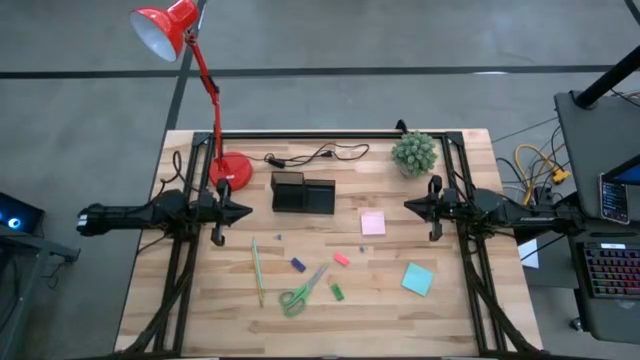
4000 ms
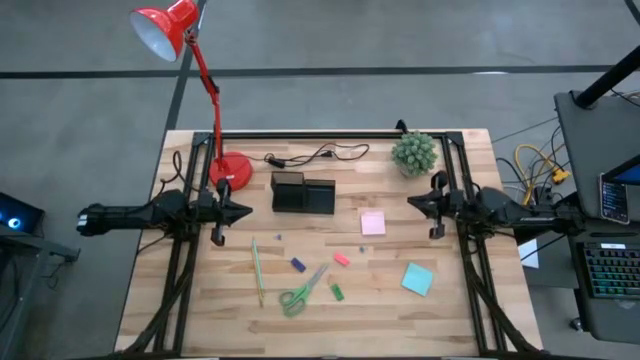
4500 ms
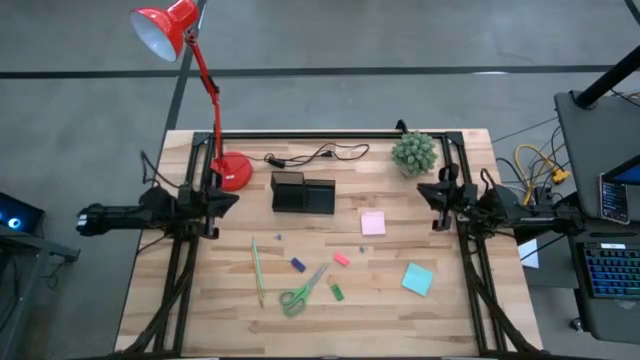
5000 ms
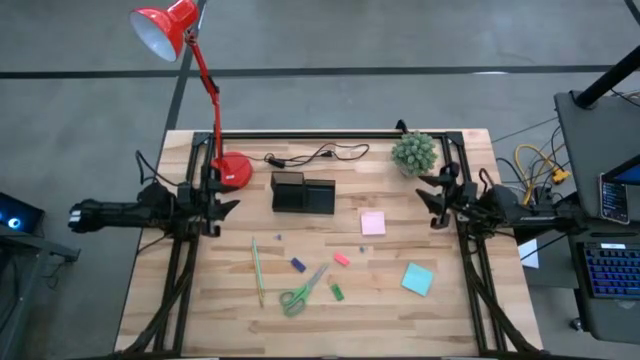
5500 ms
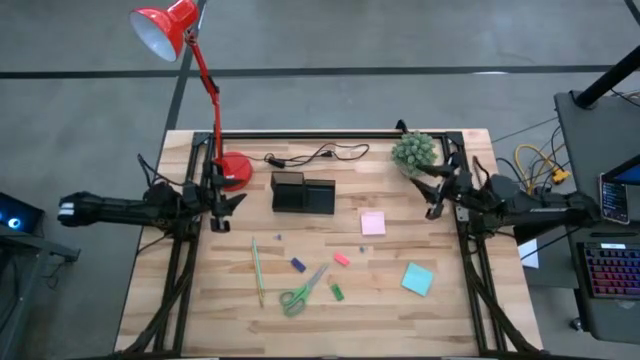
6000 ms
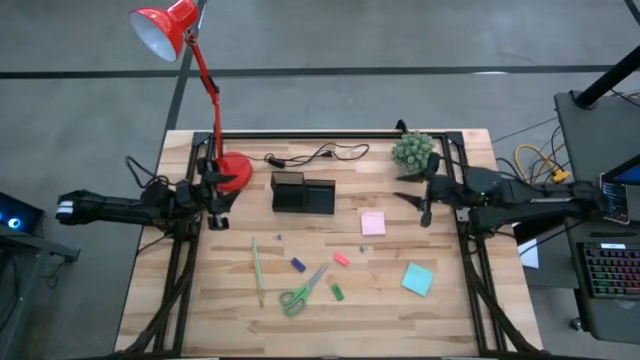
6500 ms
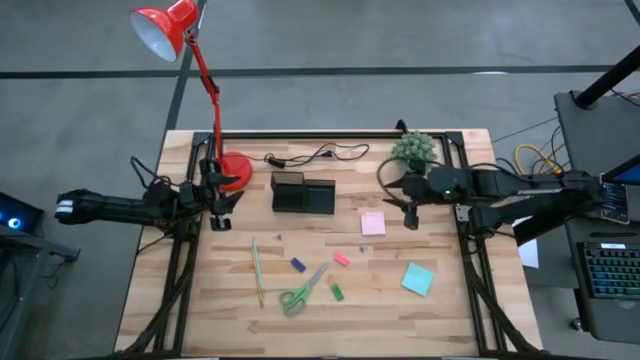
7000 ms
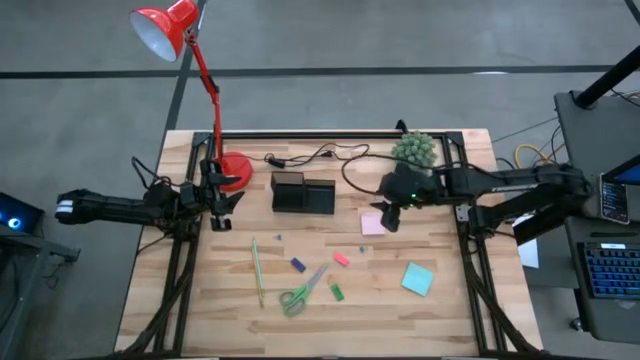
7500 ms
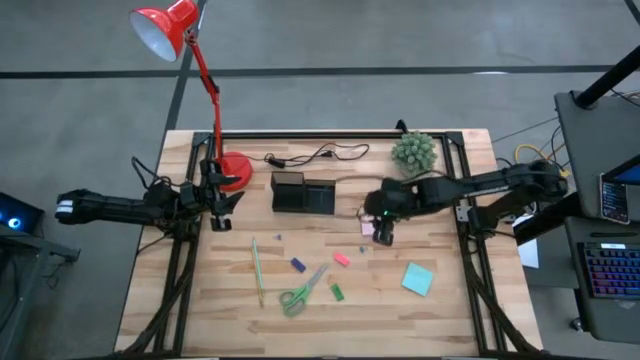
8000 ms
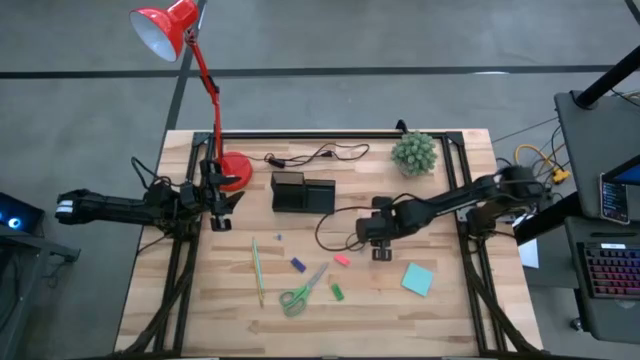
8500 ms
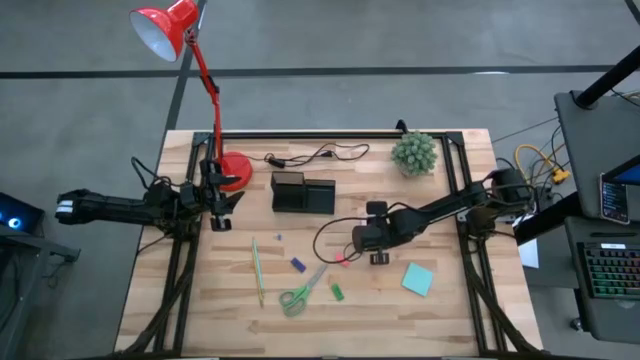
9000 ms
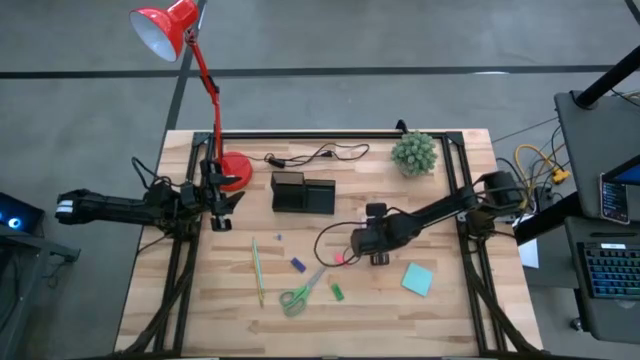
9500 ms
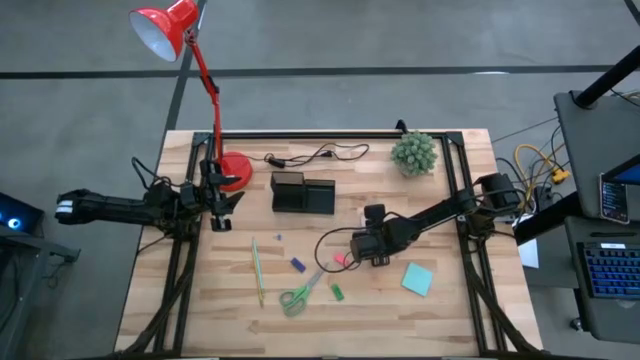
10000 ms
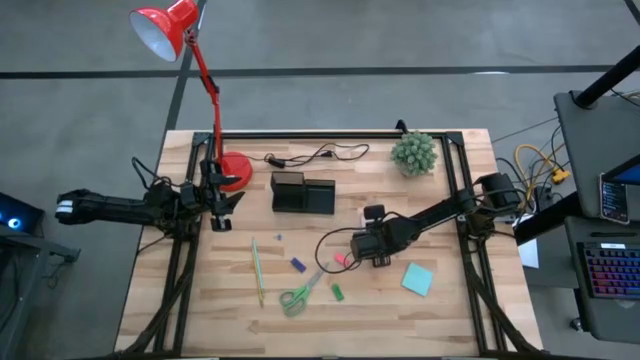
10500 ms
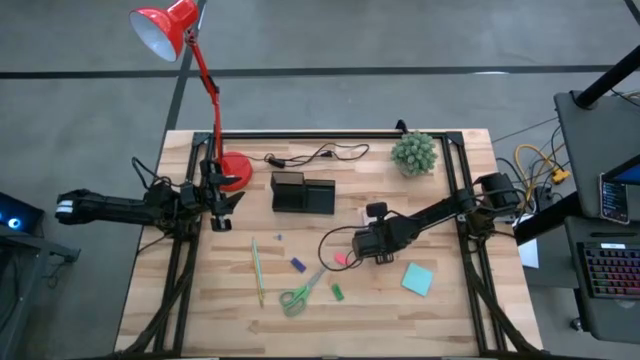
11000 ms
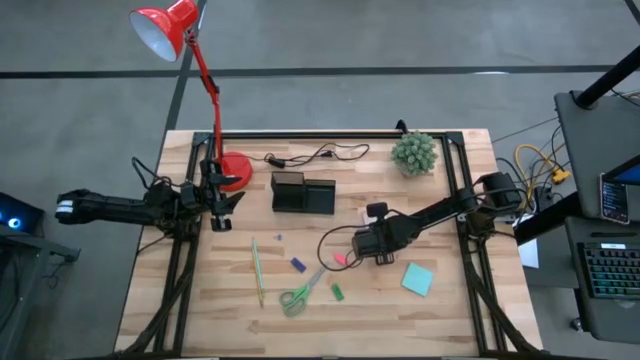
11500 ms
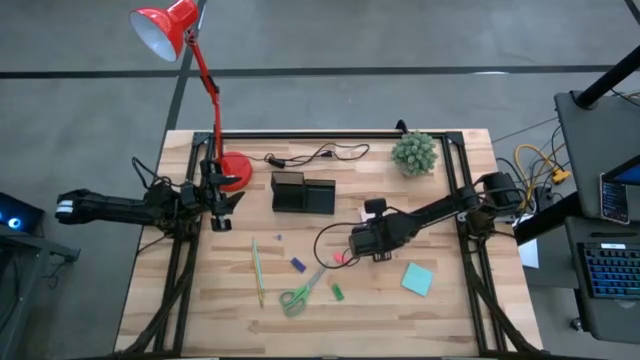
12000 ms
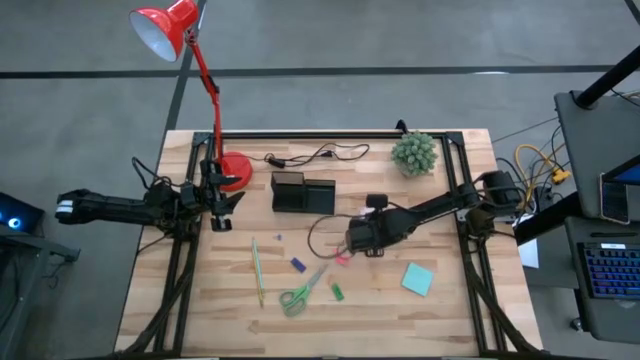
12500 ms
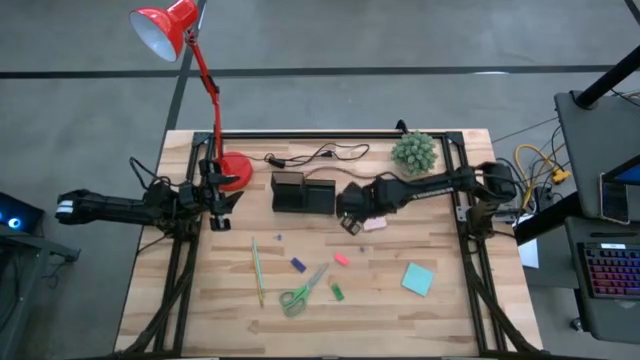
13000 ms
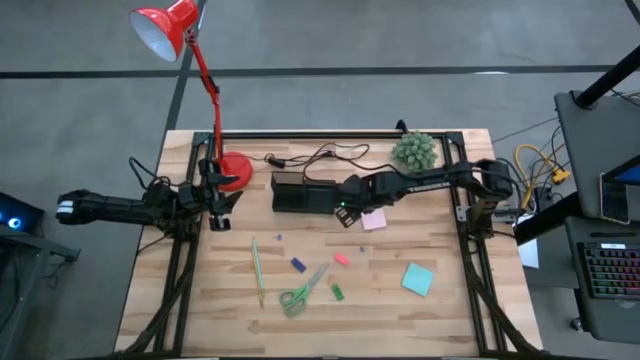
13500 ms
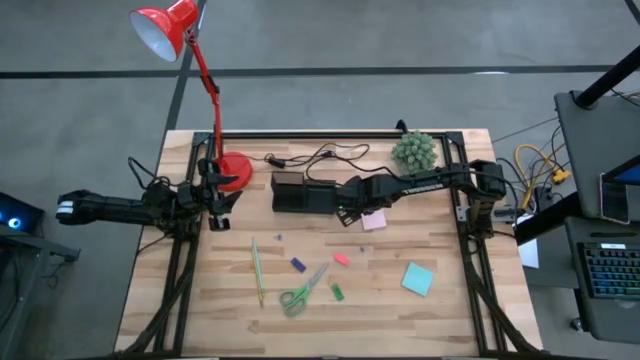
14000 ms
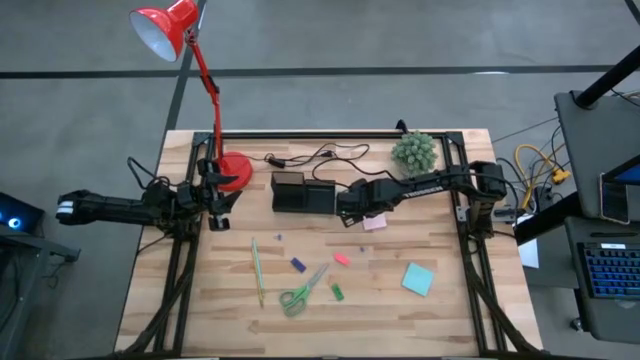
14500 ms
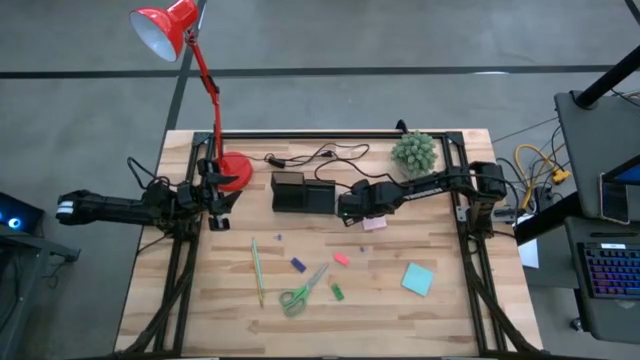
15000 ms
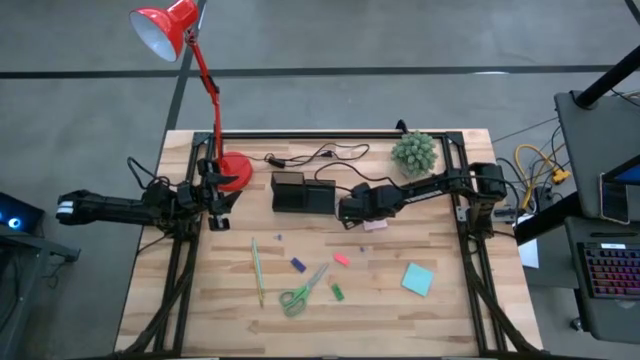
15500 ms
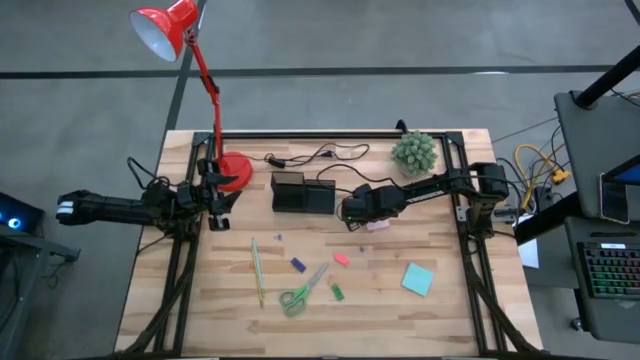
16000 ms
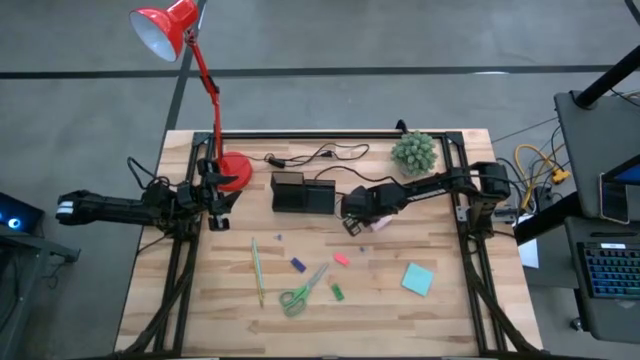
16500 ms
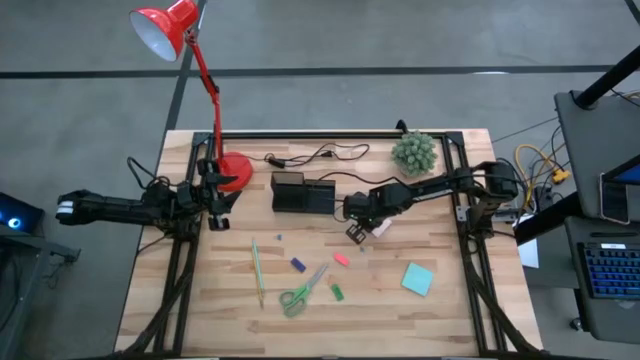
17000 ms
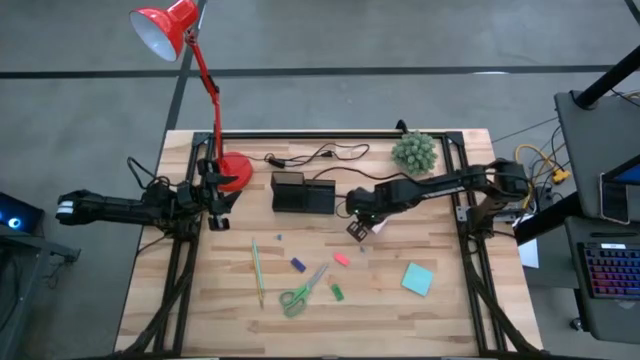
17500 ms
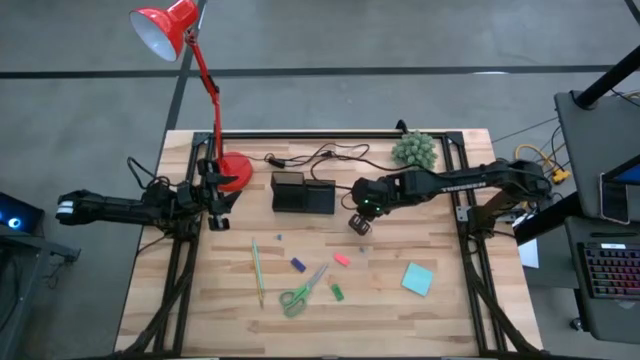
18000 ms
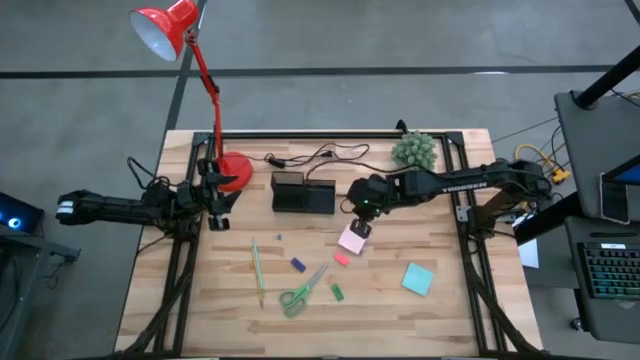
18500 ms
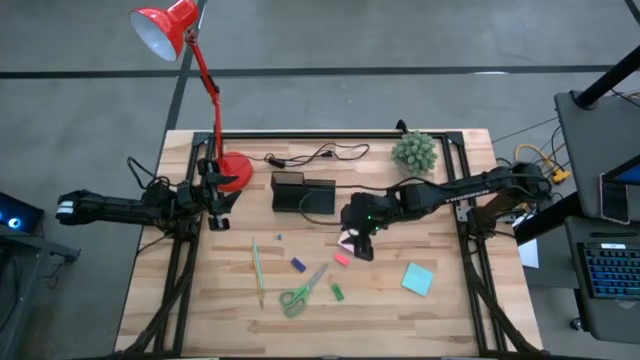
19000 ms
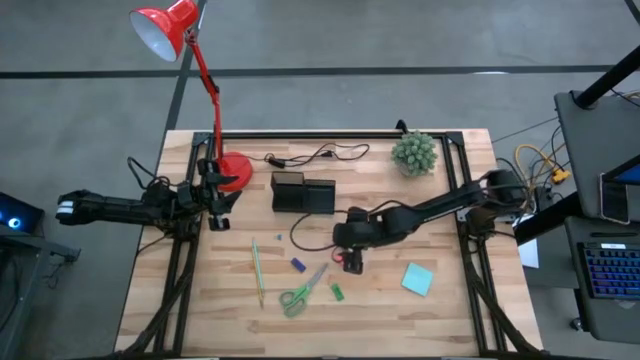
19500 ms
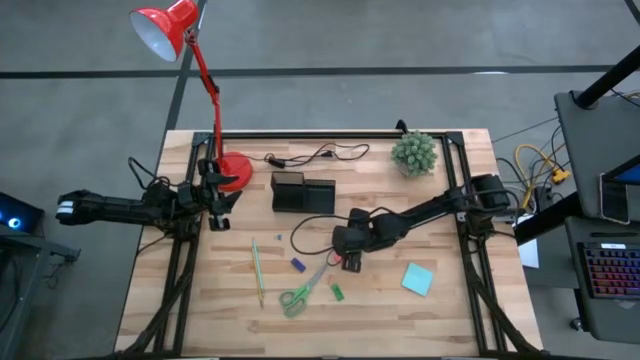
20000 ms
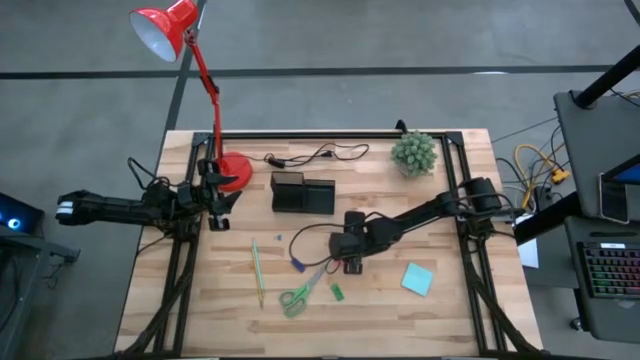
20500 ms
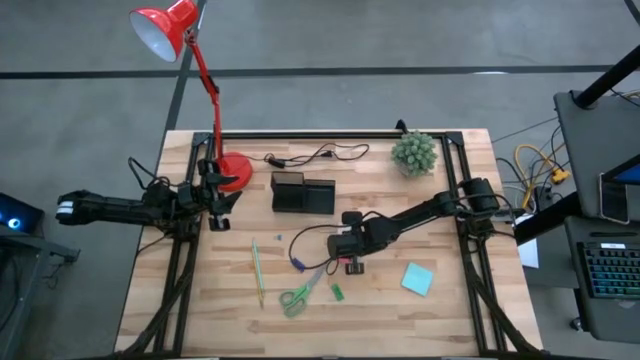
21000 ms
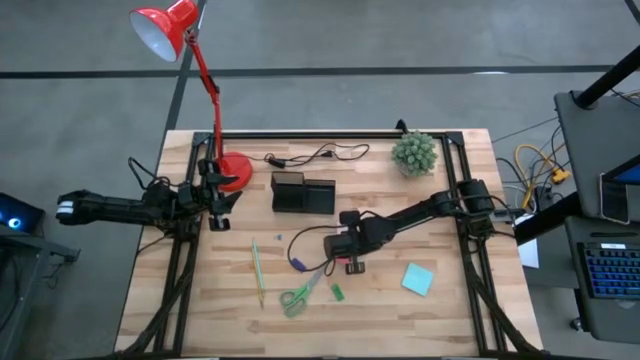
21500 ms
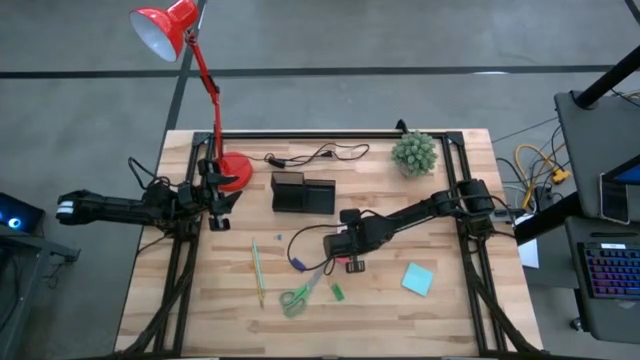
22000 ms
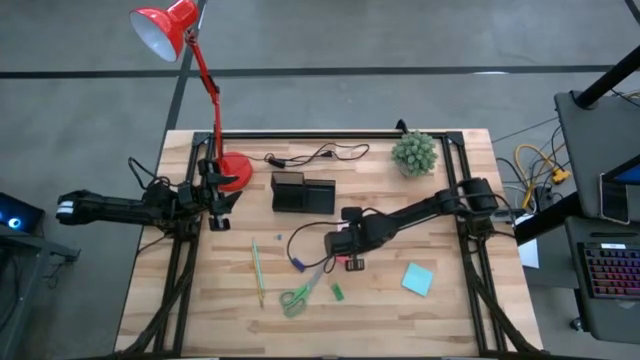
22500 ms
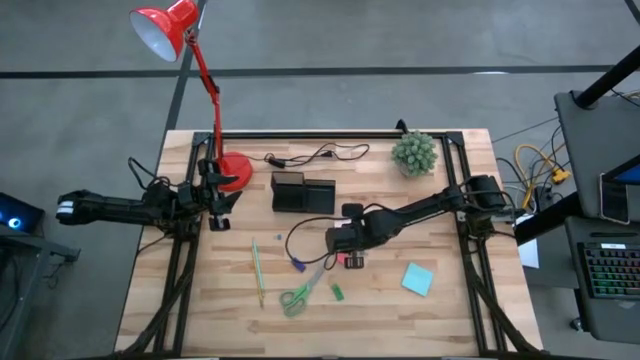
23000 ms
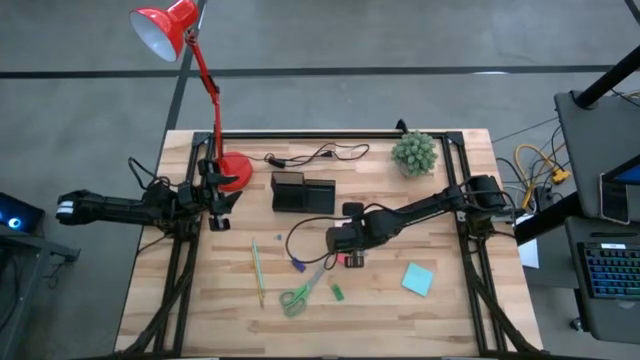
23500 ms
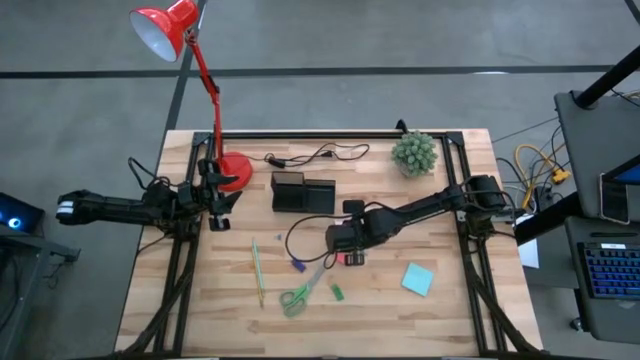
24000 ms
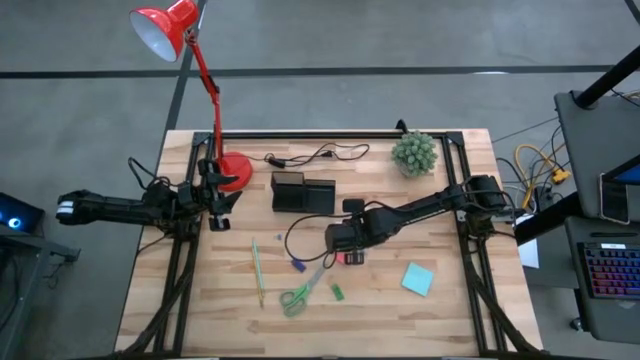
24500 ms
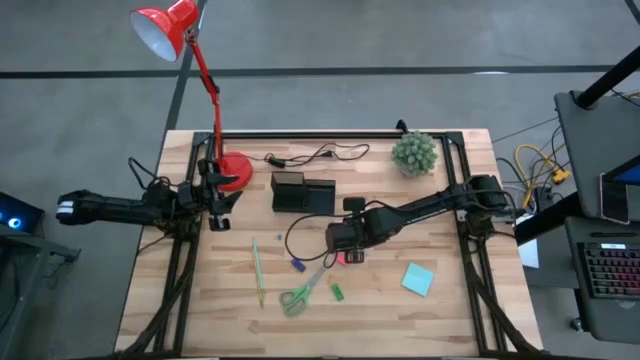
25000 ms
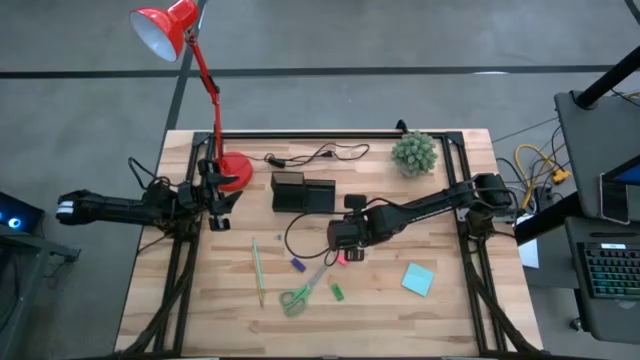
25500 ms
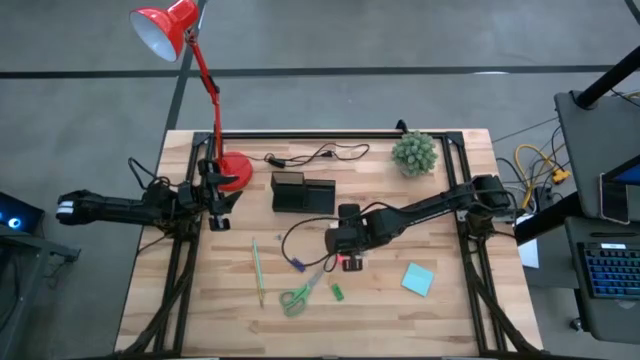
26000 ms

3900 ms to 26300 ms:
Task: Pick and place office supplies into organizer
Put the pink sticky notes into the black mesh desk organizer
